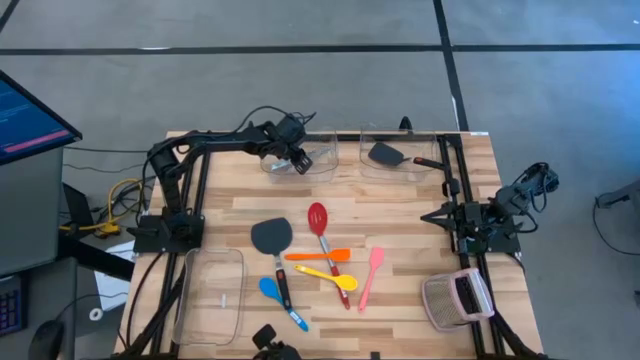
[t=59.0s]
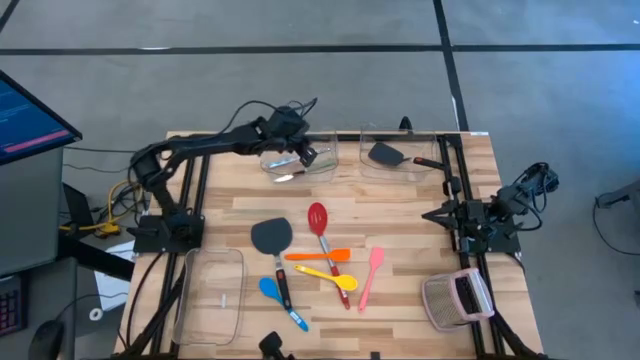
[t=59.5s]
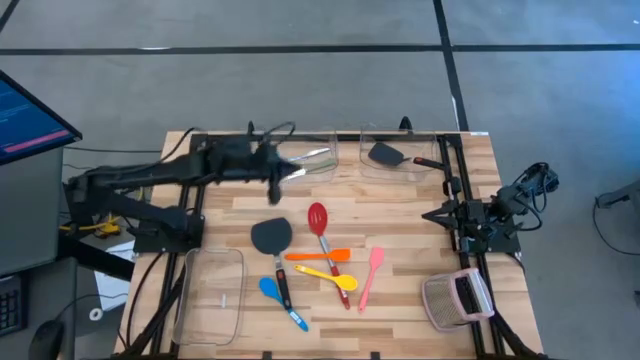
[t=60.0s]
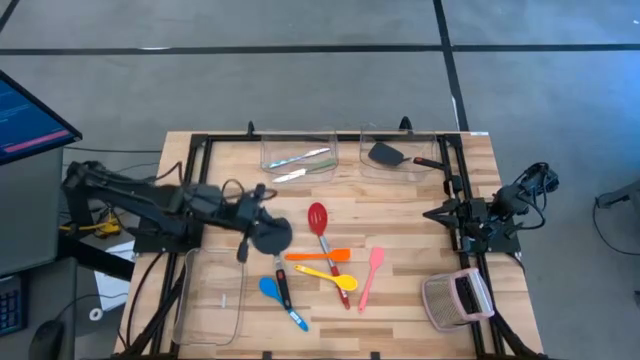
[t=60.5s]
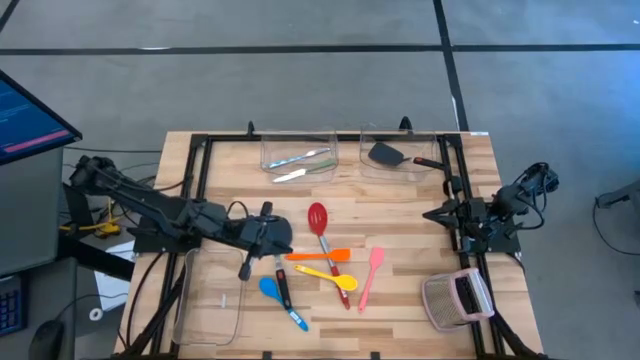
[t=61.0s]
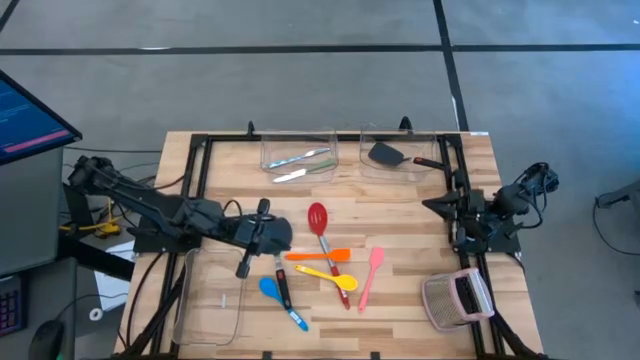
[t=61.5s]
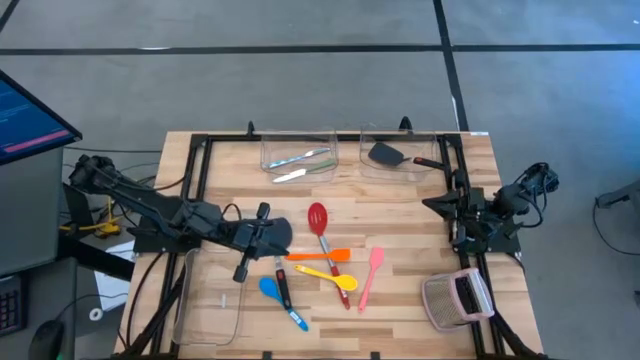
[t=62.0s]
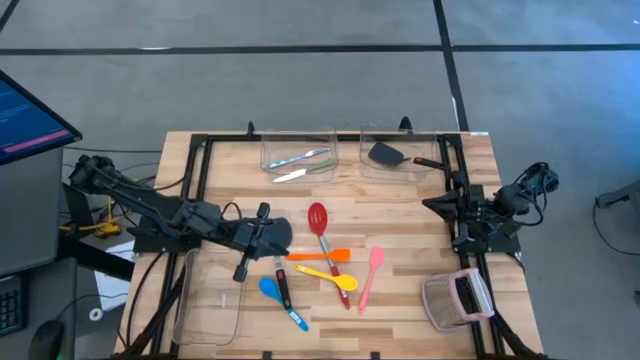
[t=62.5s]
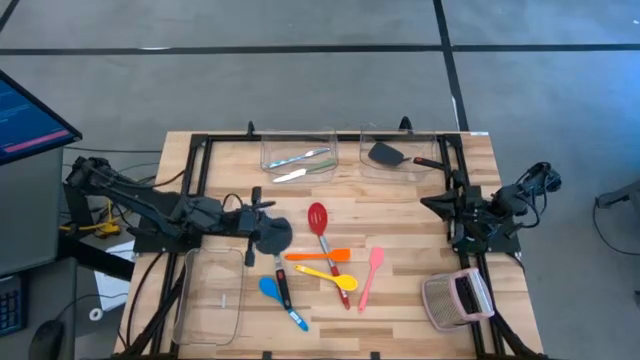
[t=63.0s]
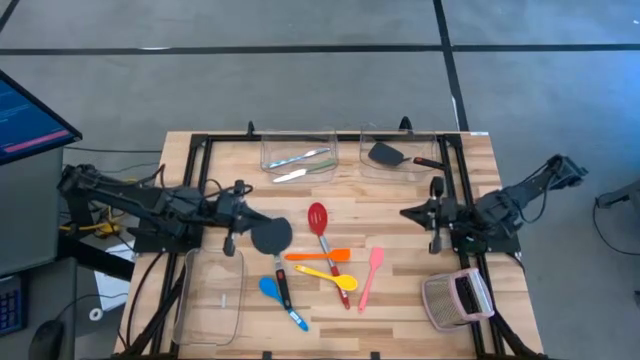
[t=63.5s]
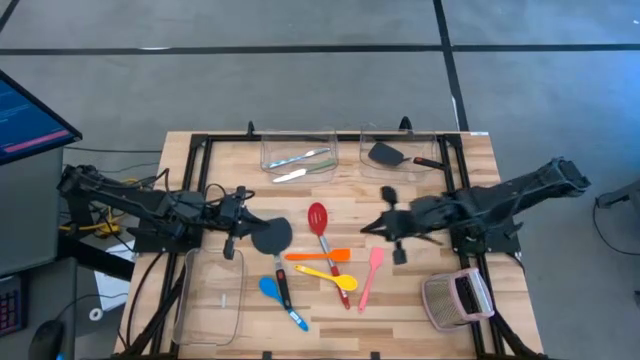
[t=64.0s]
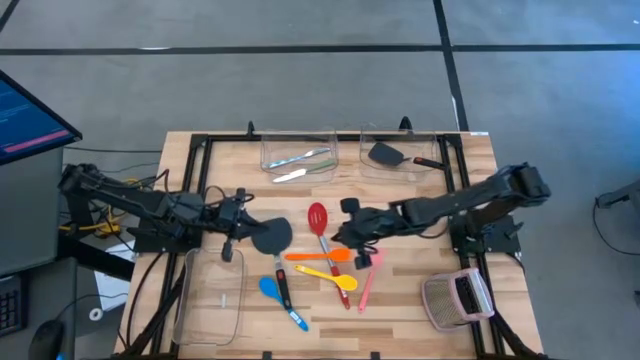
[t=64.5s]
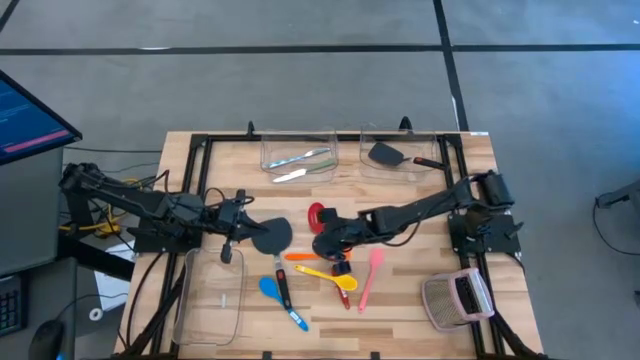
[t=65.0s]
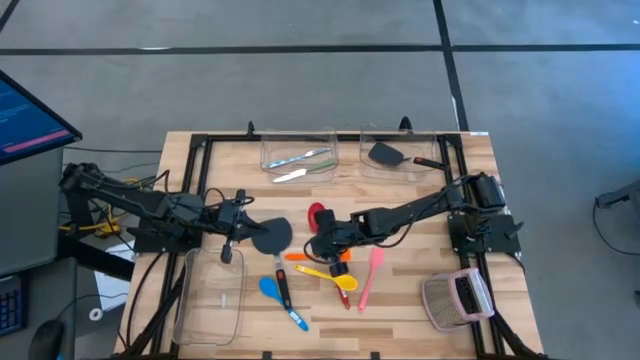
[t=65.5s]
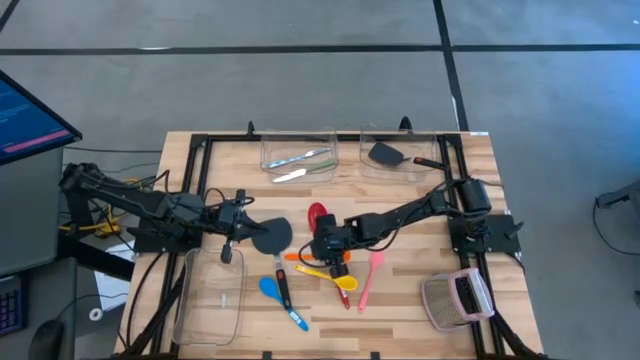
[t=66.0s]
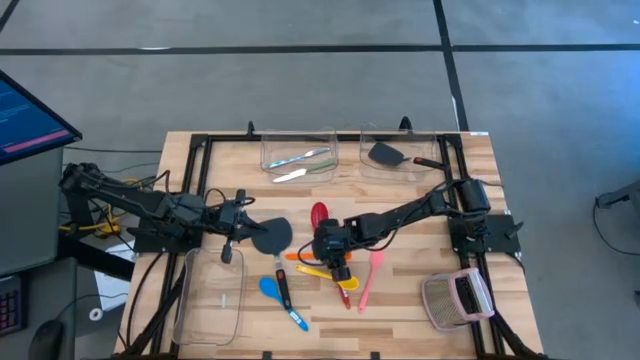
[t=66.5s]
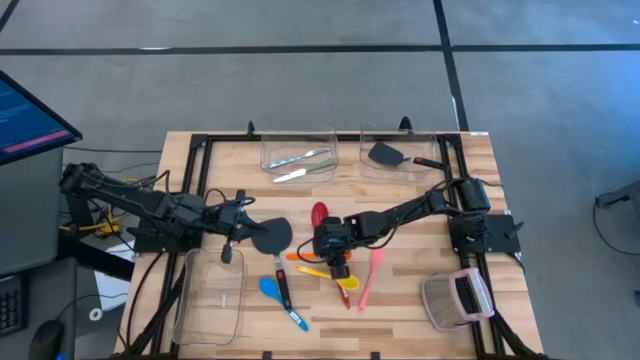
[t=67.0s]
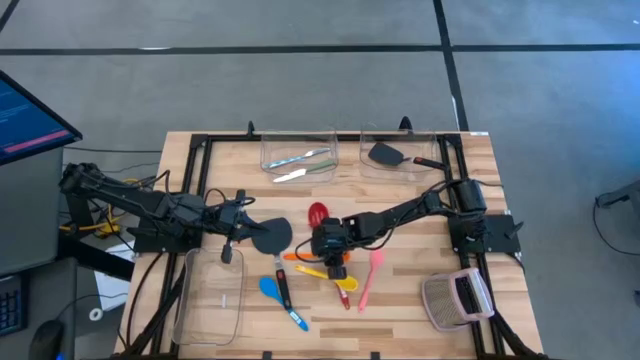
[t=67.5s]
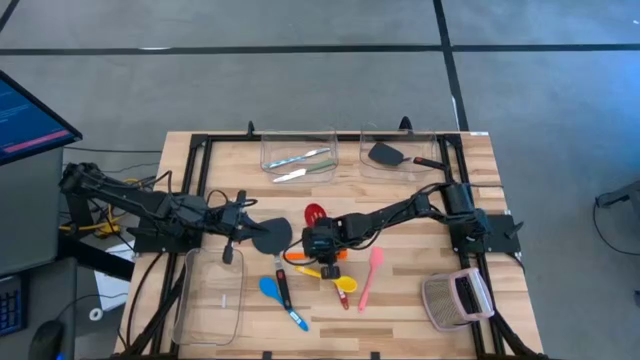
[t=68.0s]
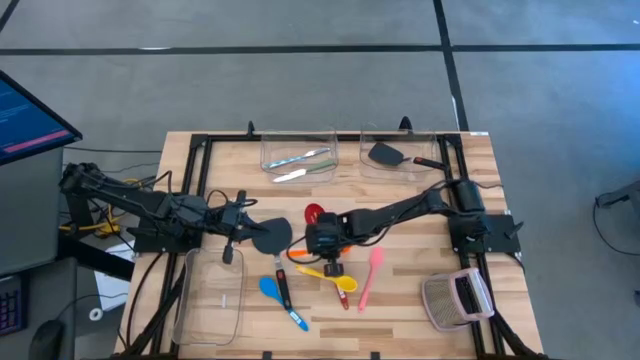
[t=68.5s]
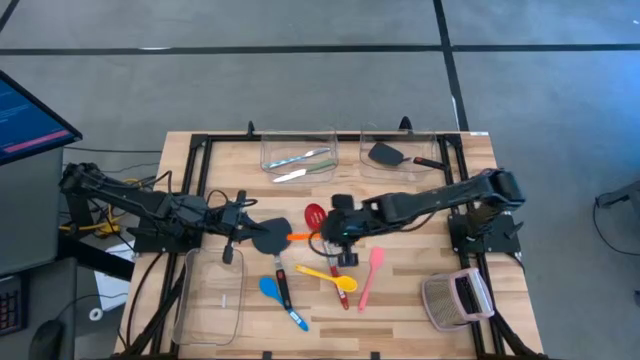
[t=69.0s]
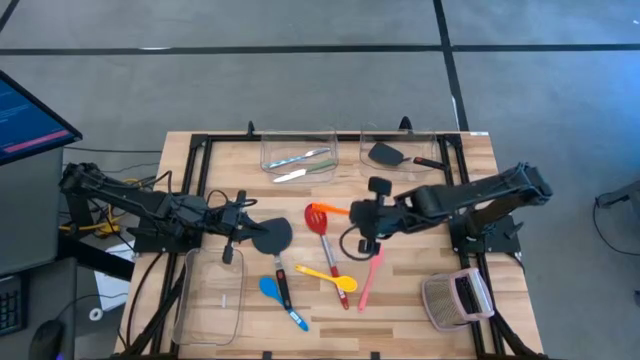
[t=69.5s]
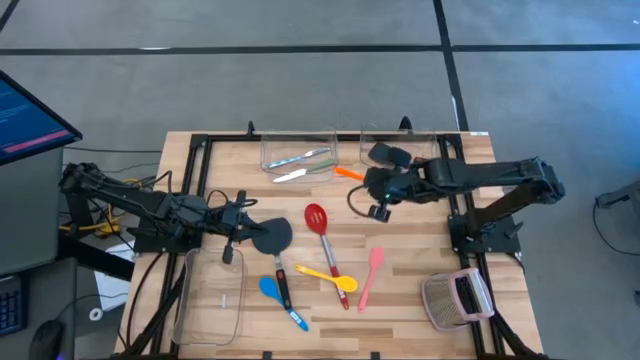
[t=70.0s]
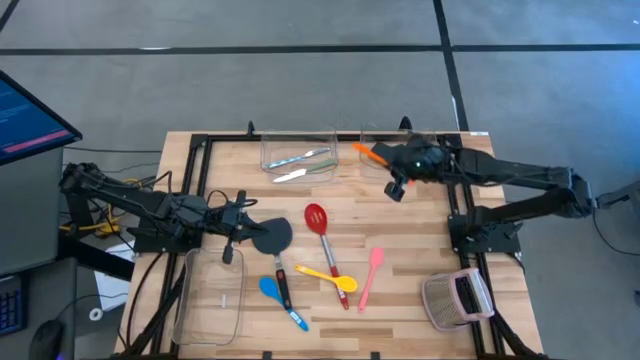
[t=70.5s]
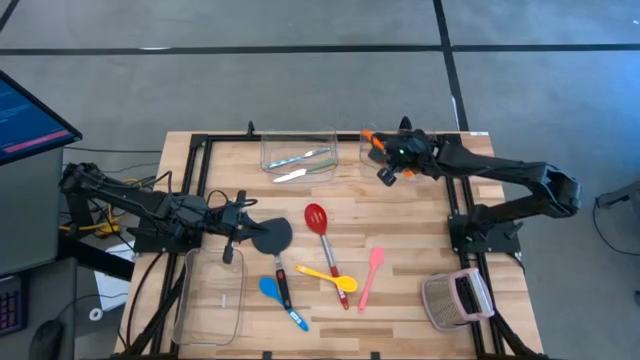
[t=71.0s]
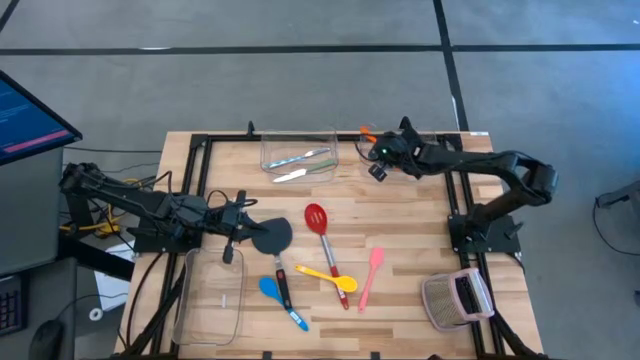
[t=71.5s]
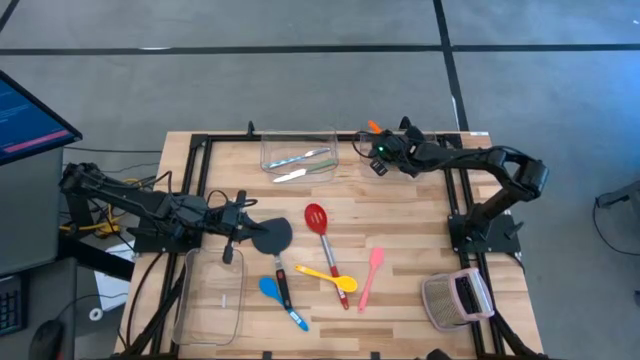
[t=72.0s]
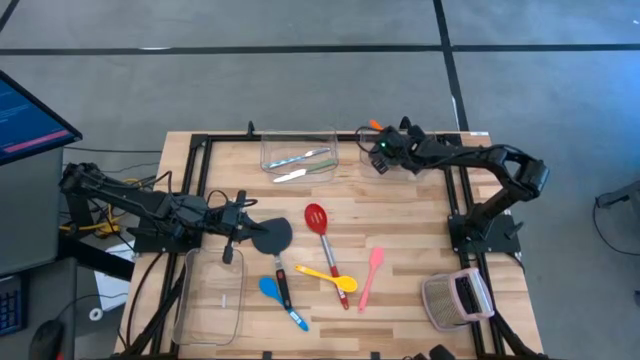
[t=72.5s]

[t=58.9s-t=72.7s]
Task: Pick & Place Kitchen Items
Put the orange spatula into the top right transparent bin
